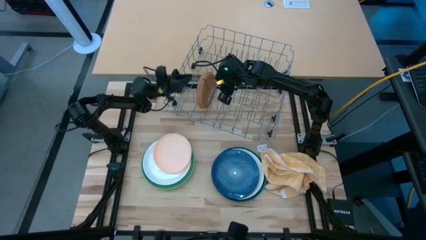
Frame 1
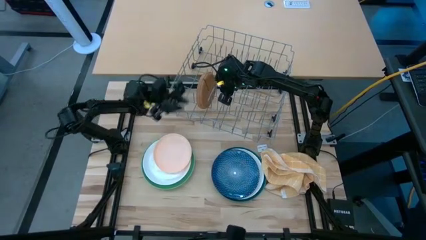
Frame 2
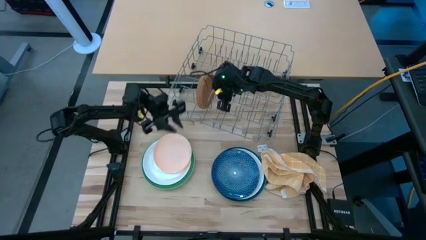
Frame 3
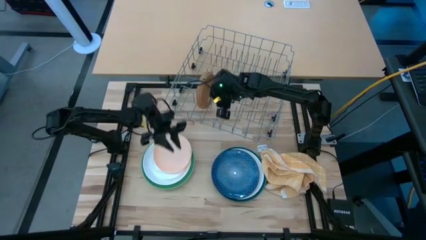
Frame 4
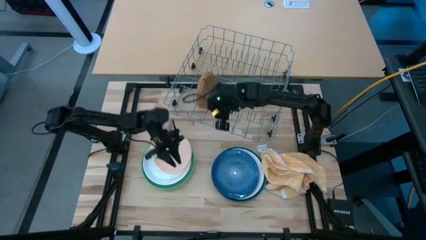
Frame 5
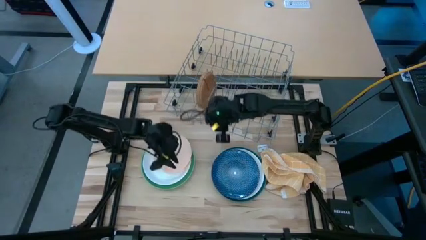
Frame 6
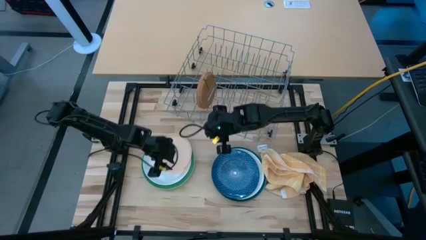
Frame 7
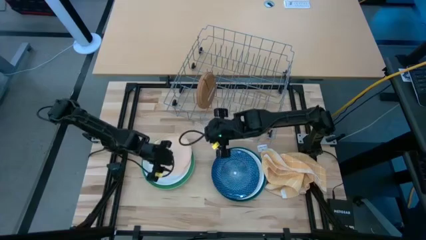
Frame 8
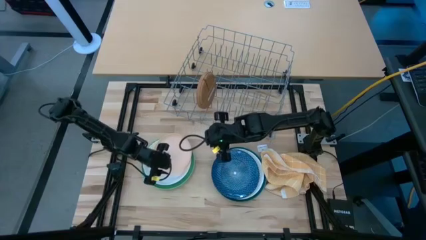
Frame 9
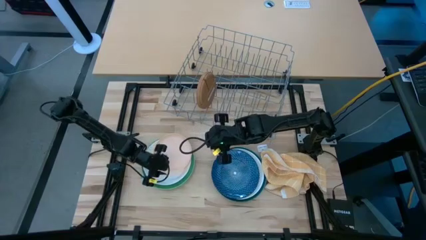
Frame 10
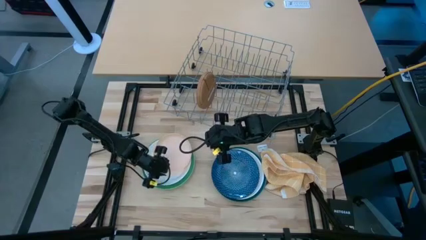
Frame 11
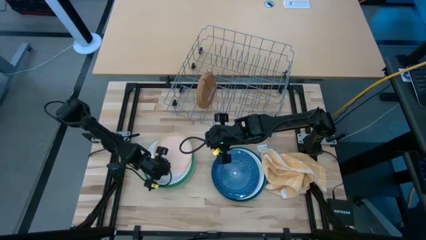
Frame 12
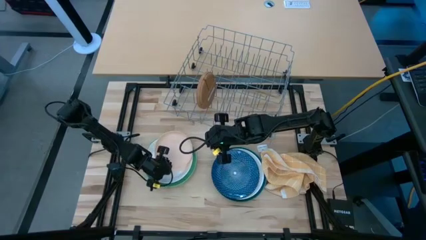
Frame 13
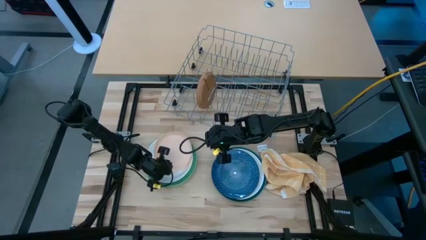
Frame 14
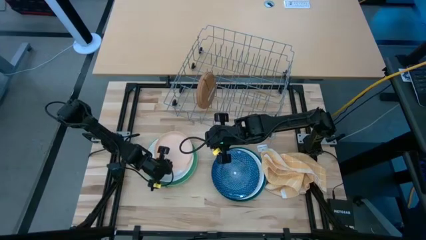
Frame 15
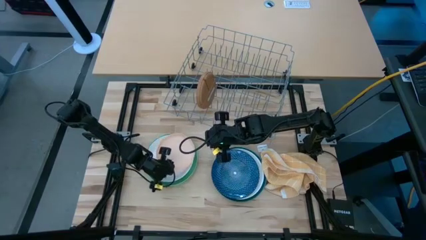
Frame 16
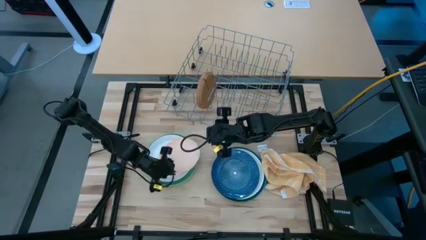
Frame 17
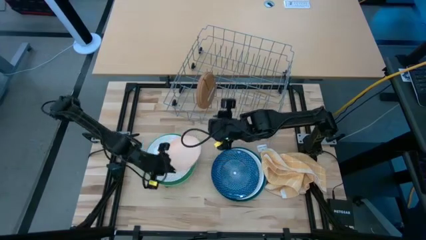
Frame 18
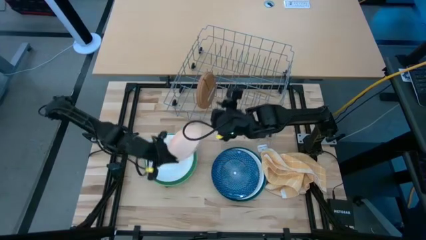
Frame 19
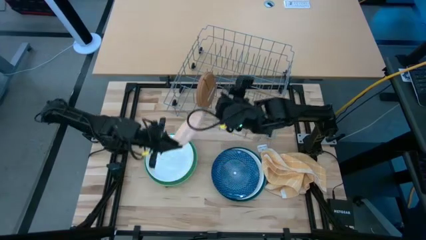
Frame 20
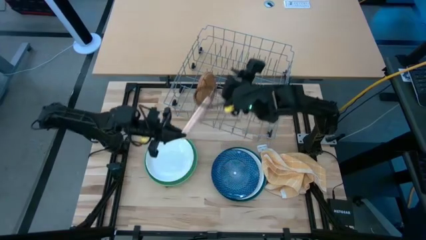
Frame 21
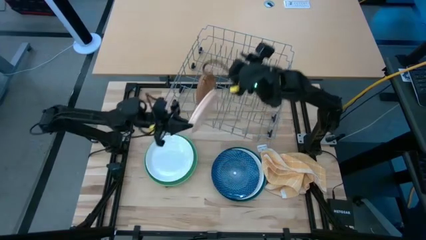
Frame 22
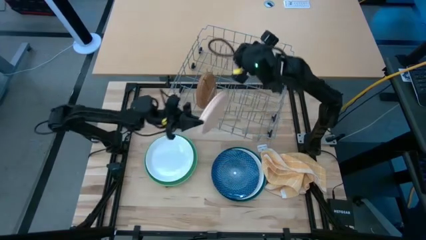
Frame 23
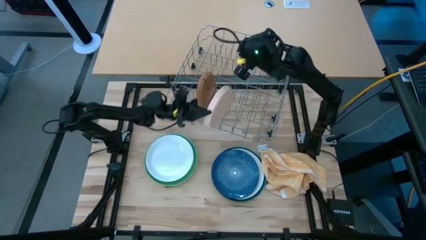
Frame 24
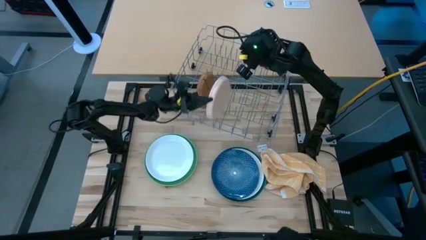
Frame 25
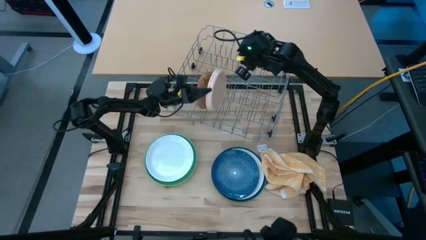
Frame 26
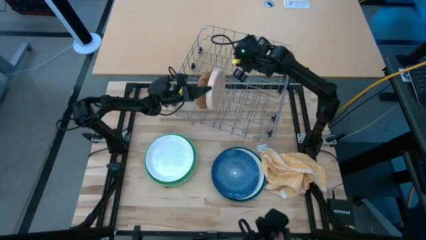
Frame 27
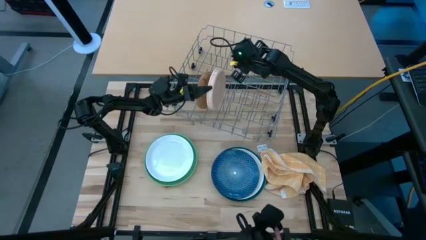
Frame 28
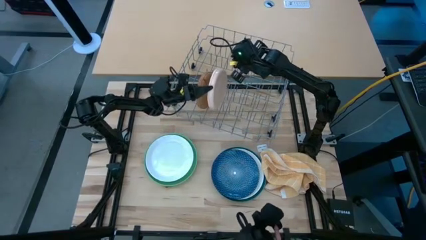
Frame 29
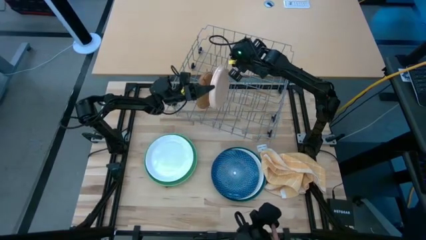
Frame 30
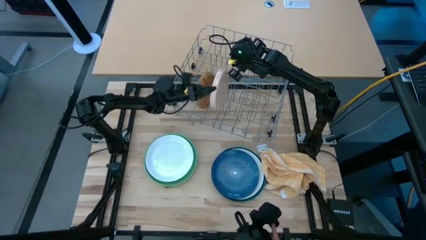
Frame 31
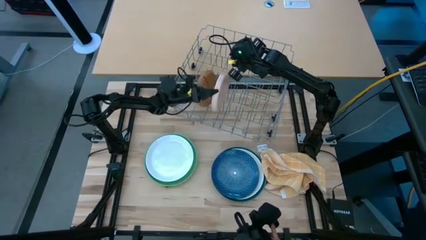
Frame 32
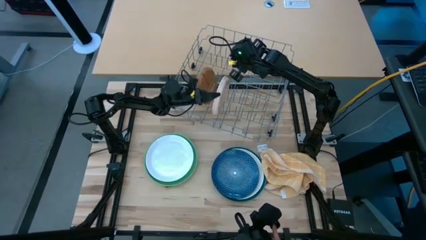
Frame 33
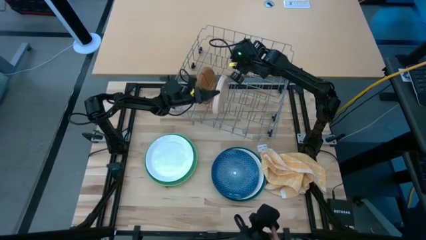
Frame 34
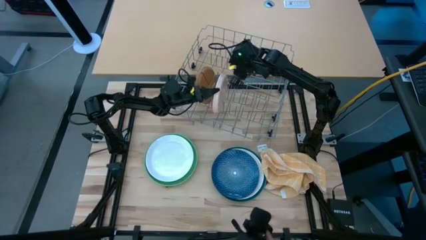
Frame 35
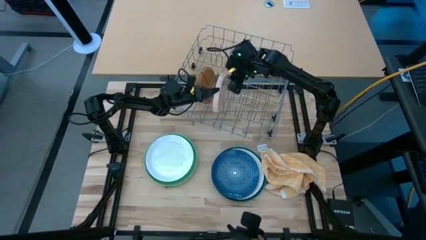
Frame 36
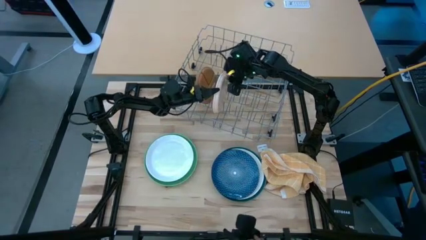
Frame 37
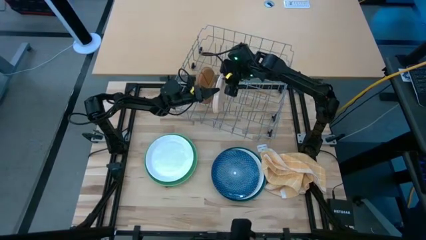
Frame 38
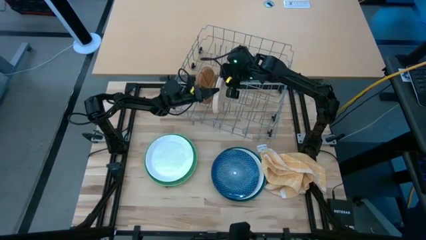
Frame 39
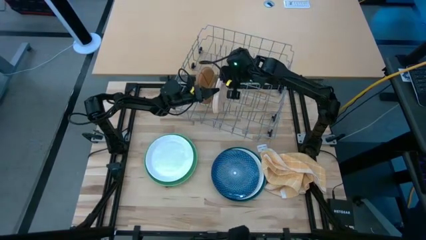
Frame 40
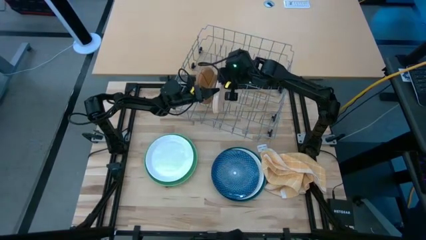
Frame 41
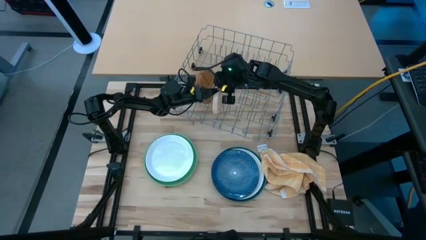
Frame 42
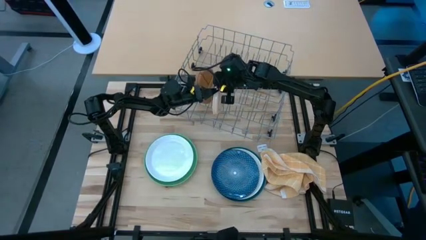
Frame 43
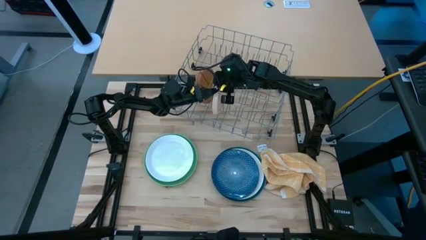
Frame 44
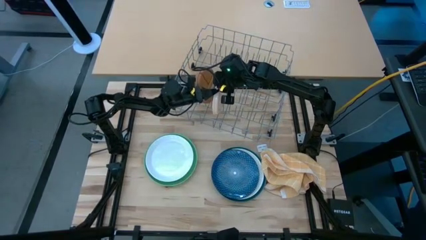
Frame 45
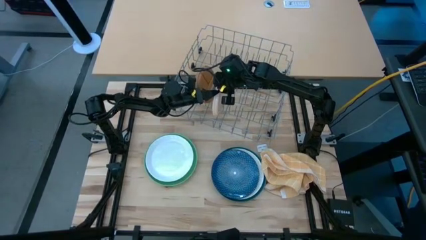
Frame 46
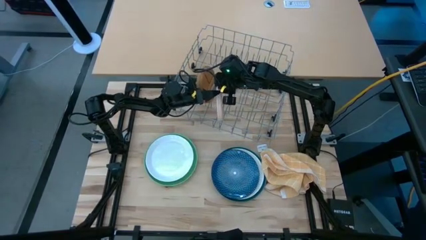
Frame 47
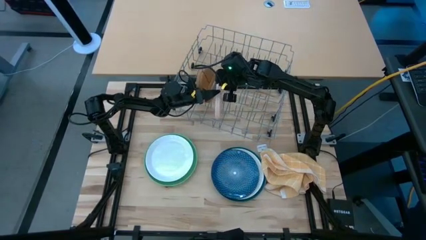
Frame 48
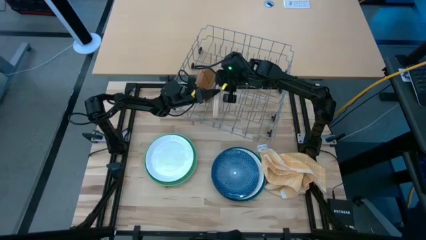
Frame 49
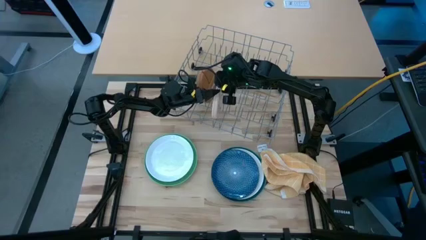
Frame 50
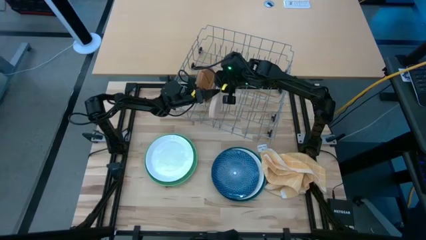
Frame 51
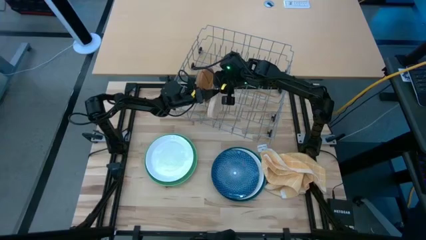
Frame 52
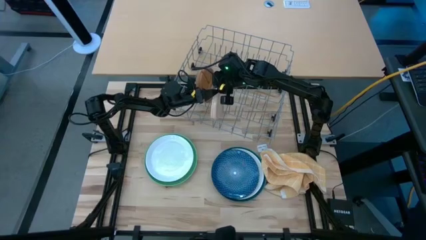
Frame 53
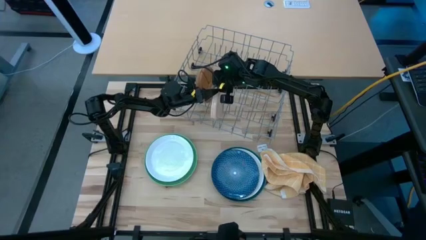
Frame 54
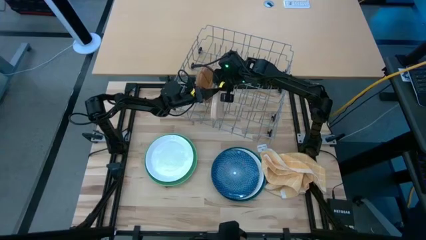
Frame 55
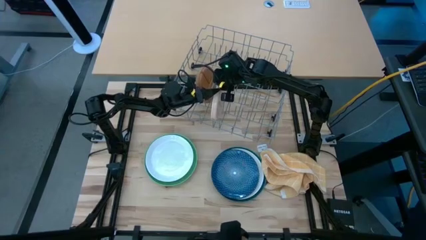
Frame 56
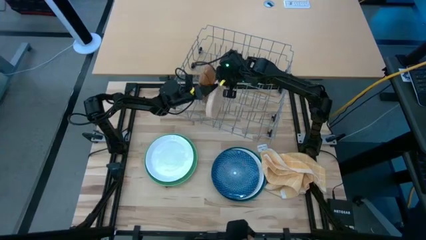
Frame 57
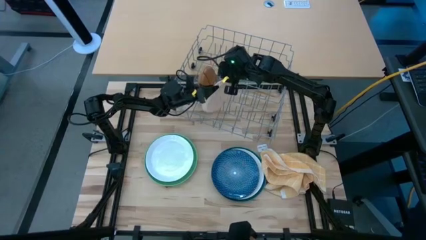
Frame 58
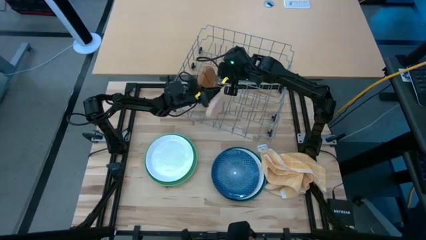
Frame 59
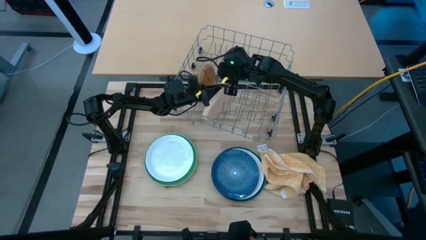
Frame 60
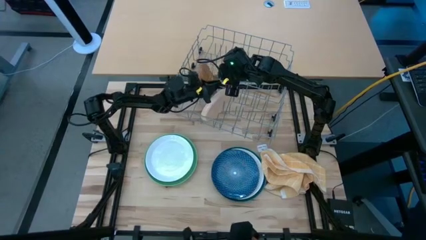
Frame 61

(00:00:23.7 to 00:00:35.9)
Task: Sort dishes
Put the light orange plate in the dish rack
